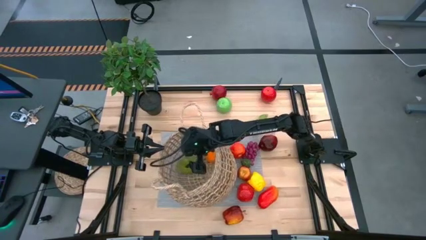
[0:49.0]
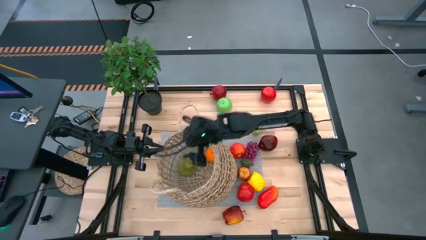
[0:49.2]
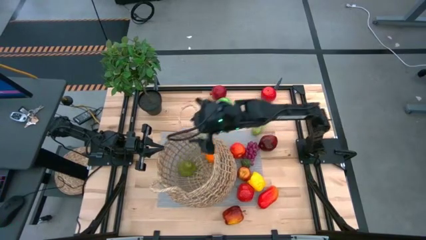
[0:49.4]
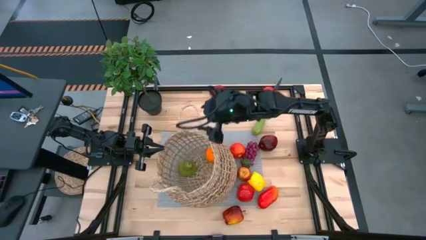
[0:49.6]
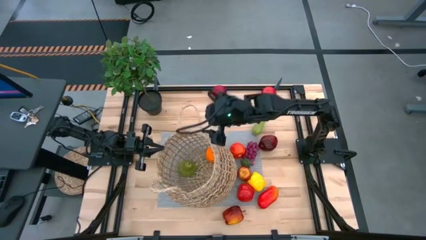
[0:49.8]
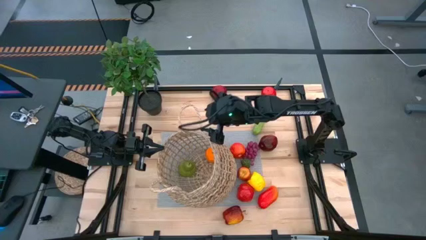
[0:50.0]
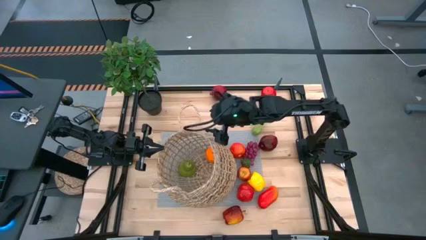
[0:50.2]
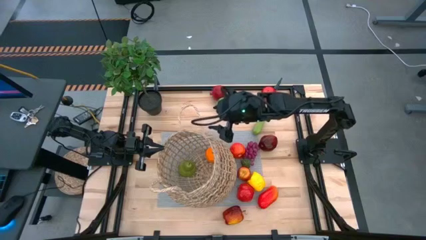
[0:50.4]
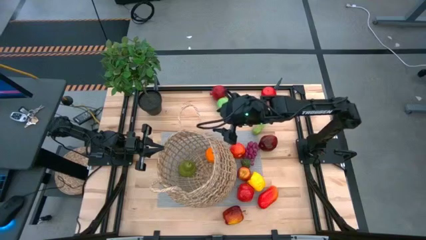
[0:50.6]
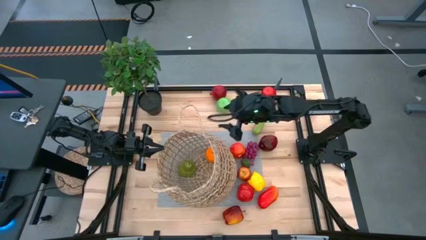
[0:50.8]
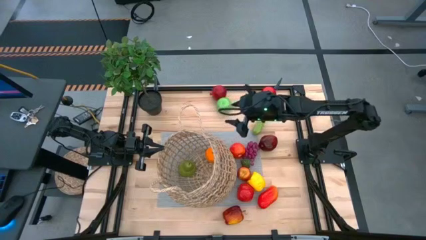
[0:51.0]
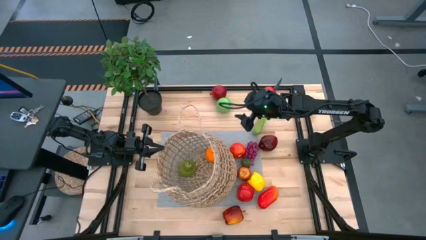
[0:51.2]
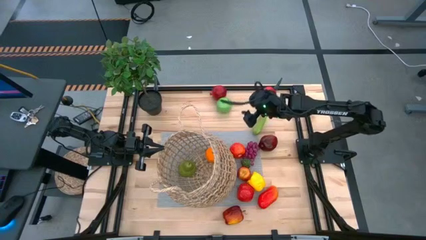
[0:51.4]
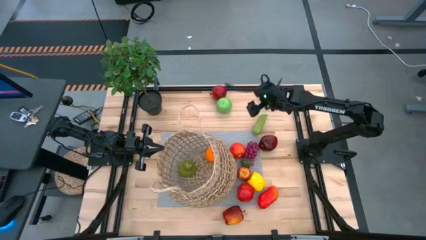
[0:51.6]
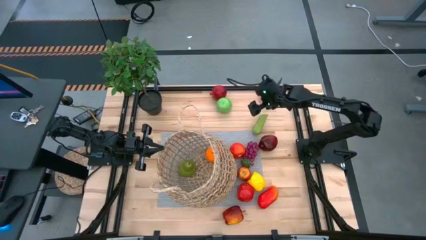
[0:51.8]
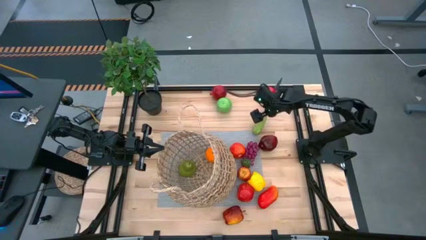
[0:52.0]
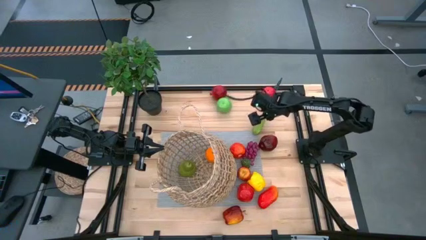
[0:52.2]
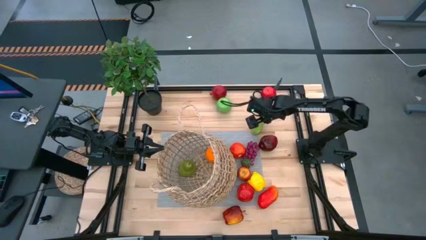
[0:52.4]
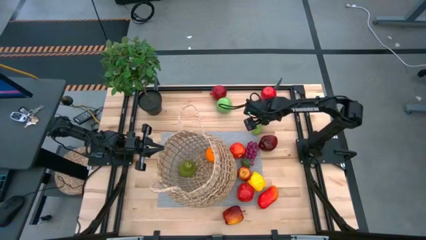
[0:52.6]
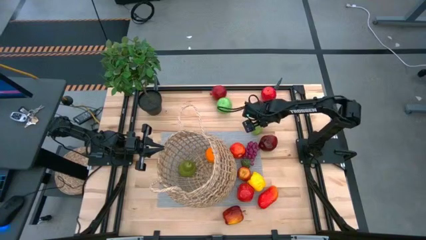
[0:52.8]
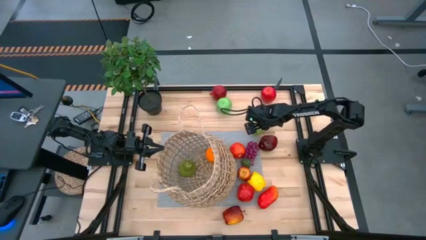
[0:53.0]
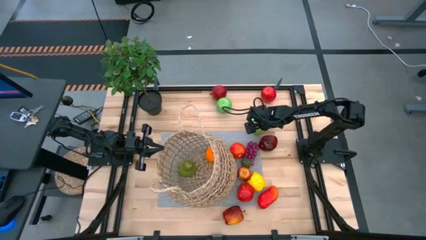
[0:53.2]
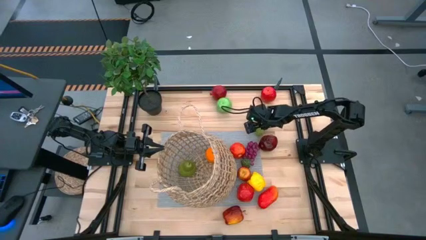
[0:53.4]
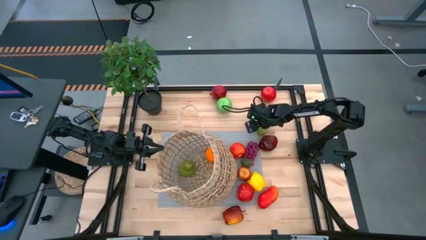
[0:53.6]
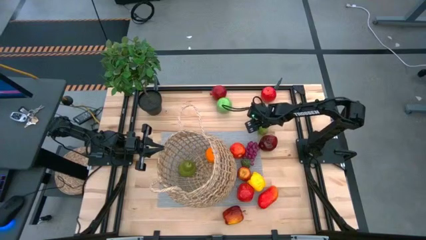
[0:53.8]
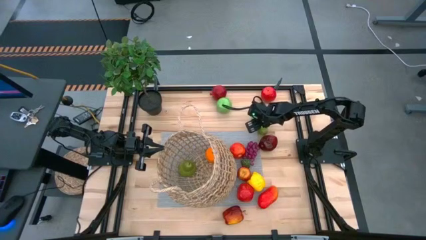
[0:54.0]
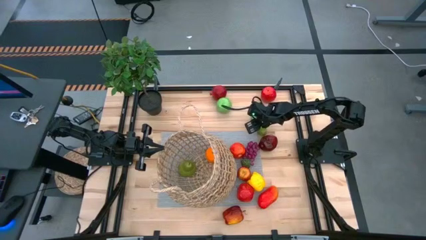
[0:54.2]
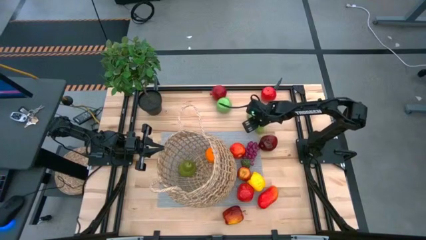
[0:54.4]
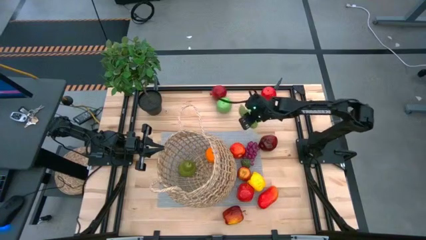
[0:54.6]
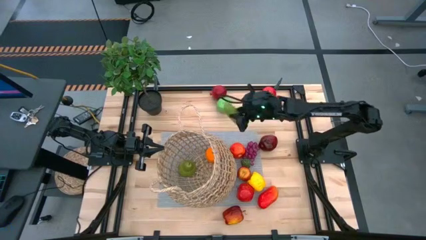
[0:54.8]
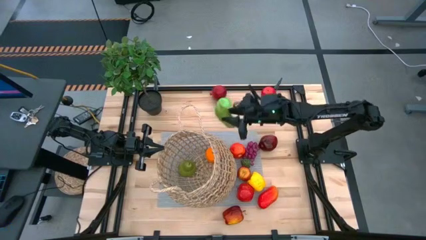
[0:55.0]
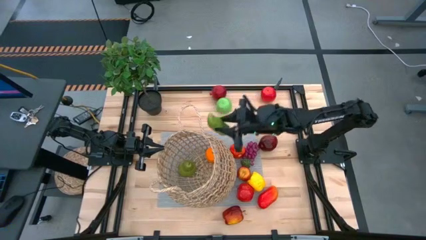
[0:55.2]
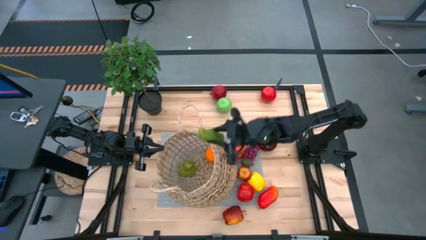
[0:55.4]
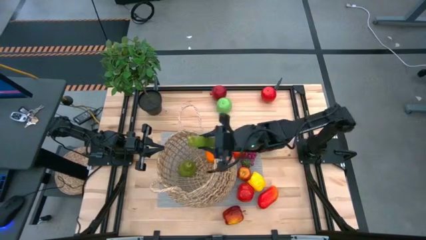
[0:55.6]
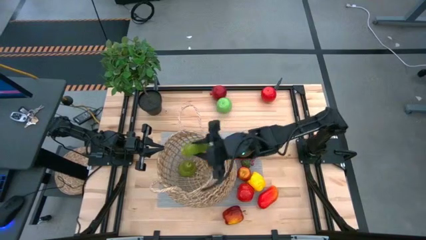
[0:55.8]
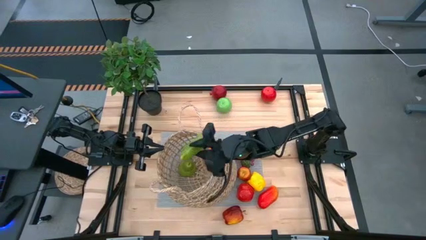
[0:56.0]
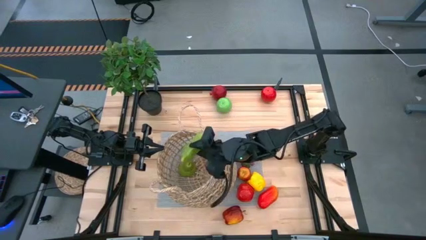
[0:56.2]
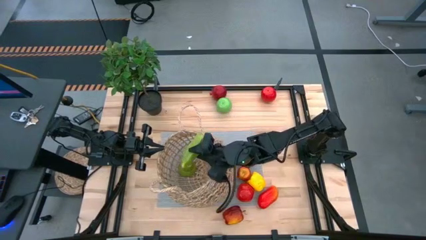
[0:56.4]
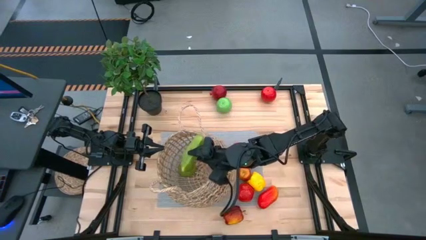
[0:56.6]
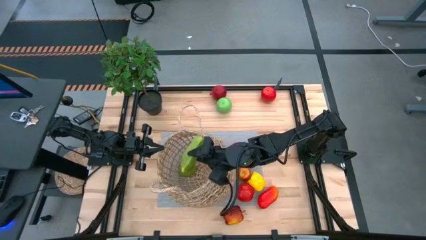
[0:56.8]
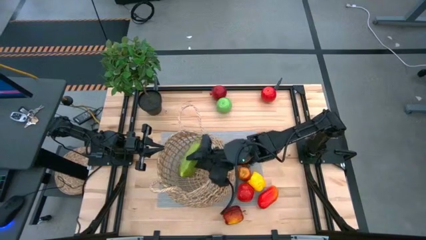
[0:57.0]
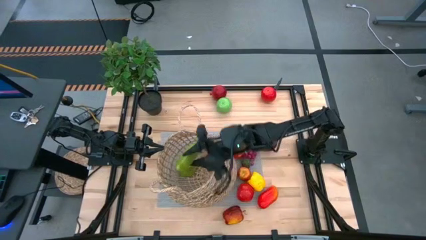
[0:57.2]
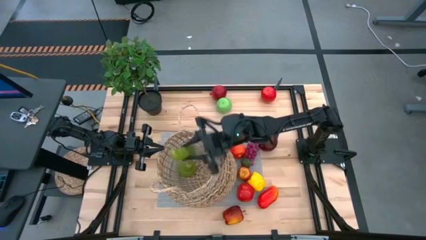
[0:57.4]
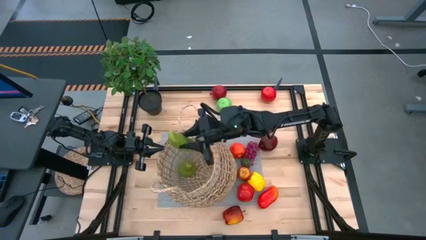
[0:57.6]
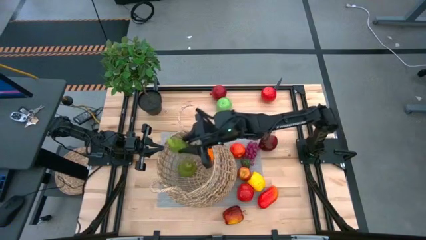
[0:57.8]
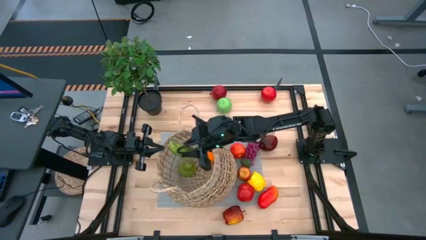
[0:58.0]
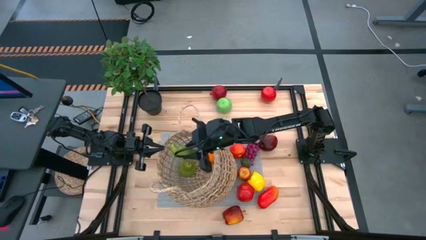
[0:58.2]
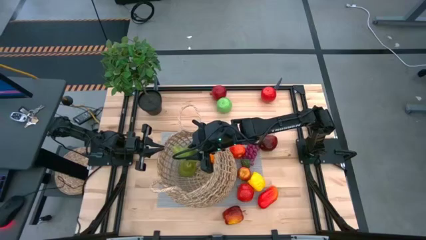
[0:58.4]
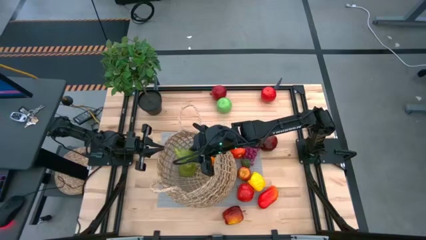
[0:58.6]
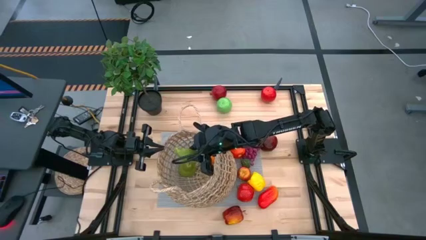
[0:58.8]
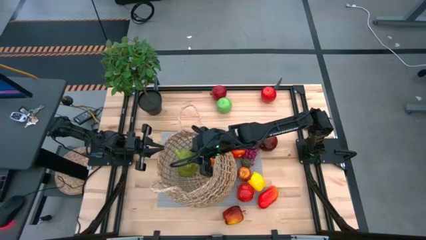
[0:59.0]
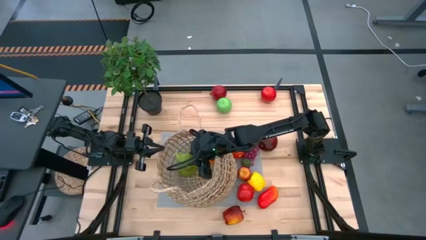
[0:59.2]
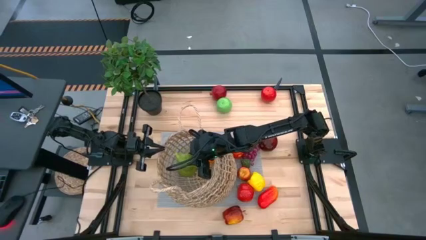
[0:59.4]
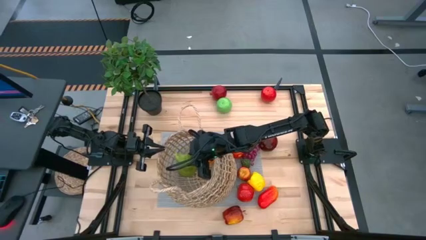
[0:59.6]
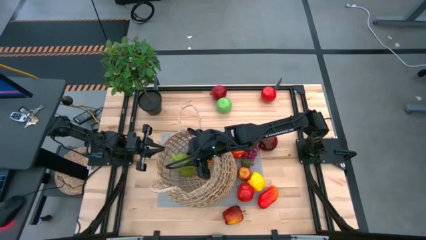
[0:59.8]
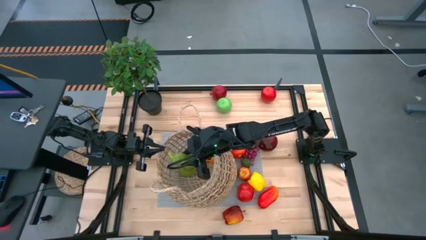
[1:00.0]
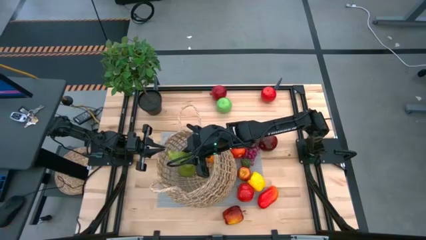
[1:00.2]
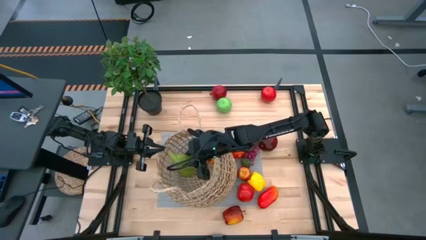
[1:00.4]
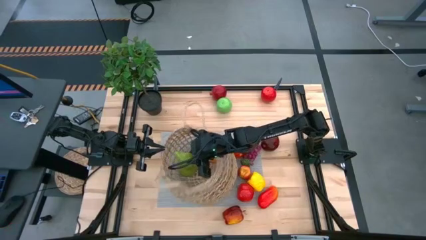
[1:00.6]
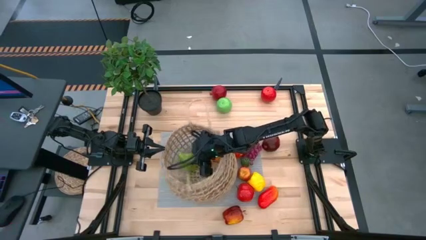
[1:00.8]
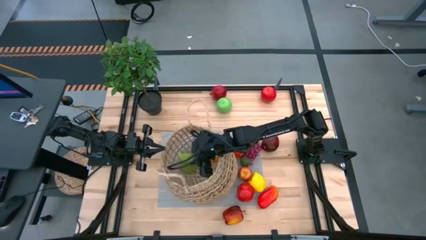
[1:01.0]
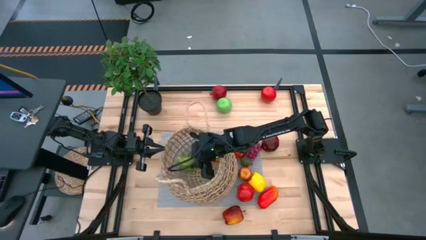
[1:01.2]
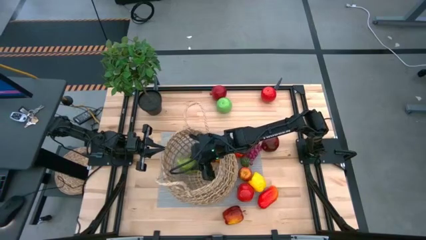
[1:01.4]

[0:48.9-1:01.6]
Task: Build produce basket
Put the cucumber into the brown basket

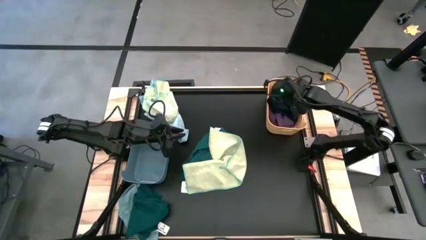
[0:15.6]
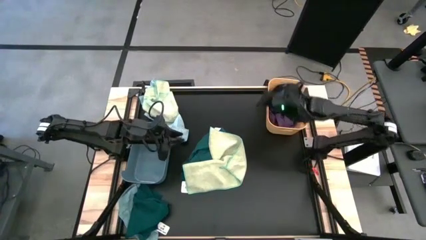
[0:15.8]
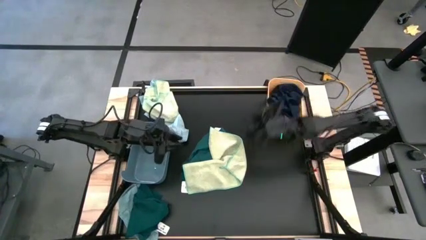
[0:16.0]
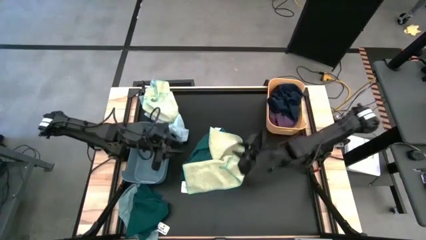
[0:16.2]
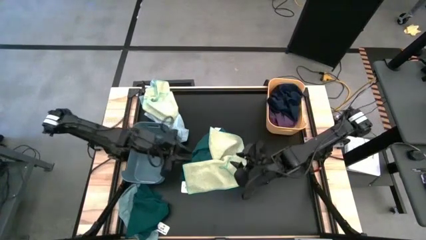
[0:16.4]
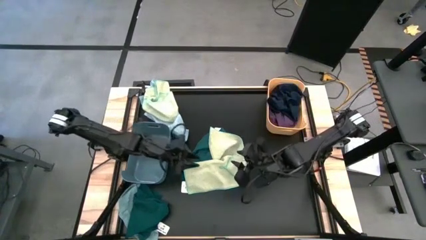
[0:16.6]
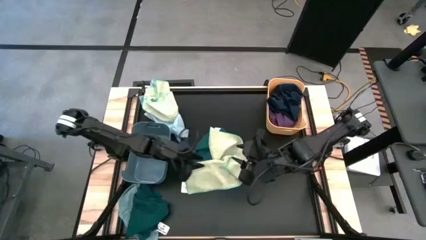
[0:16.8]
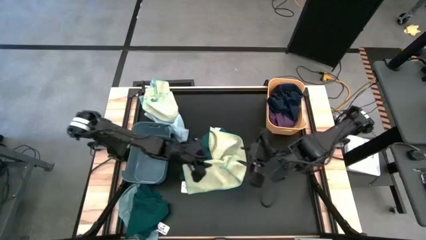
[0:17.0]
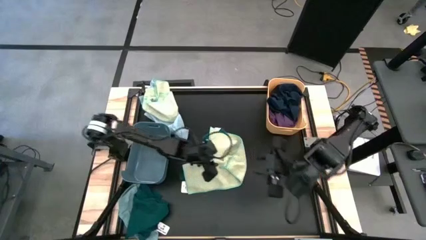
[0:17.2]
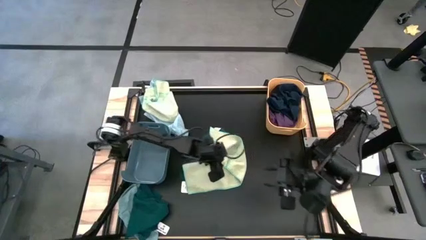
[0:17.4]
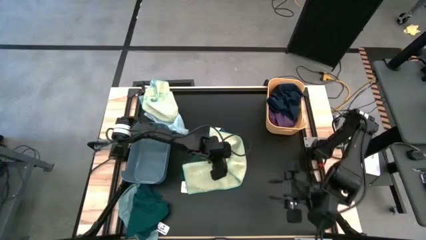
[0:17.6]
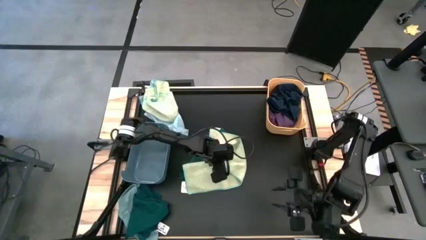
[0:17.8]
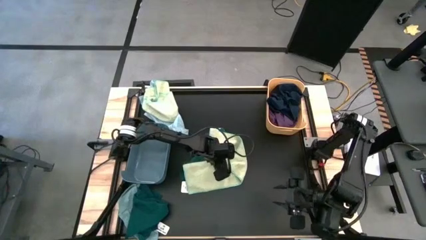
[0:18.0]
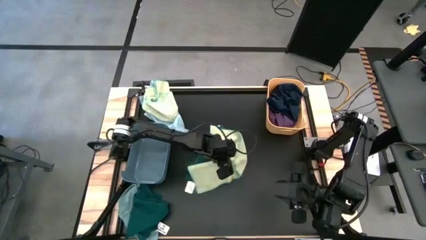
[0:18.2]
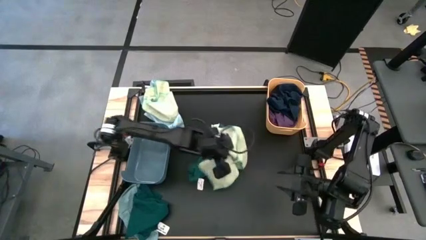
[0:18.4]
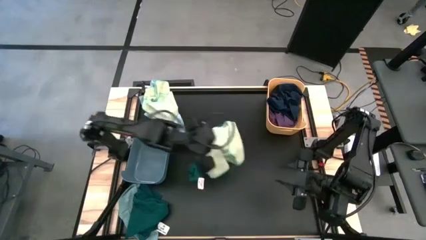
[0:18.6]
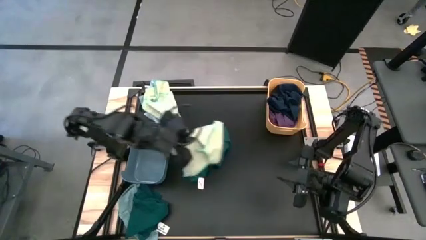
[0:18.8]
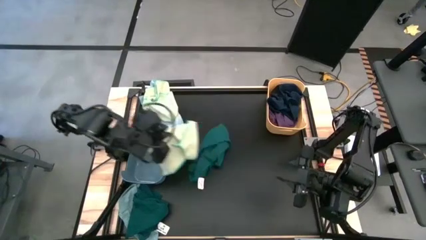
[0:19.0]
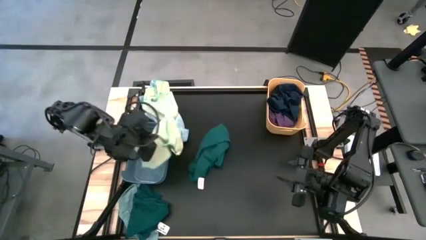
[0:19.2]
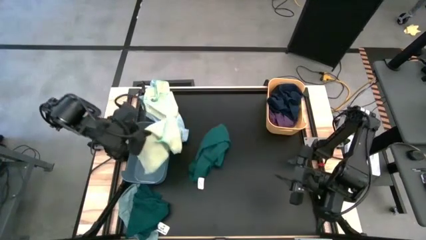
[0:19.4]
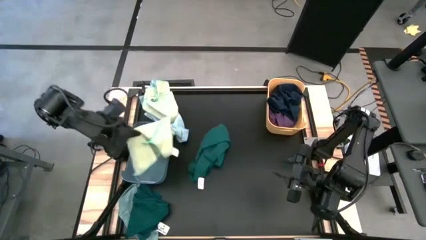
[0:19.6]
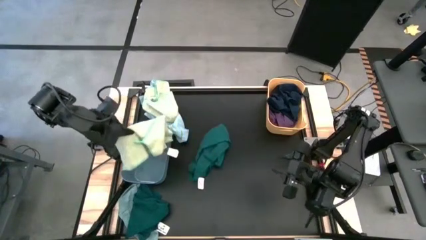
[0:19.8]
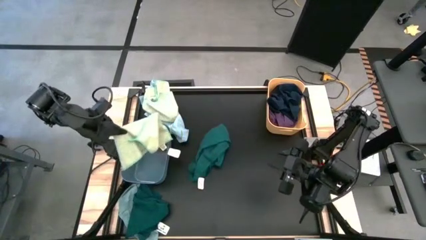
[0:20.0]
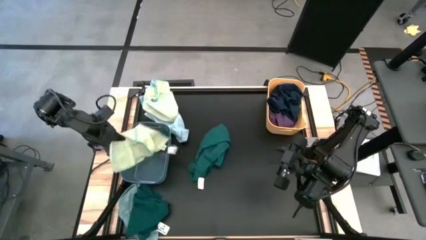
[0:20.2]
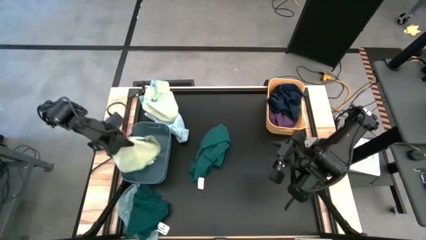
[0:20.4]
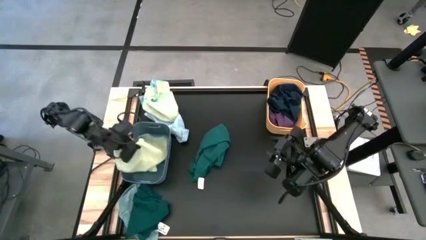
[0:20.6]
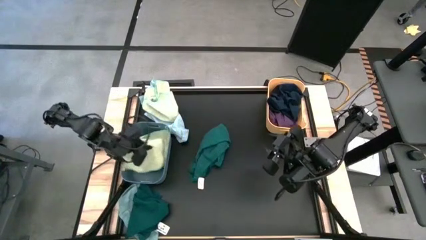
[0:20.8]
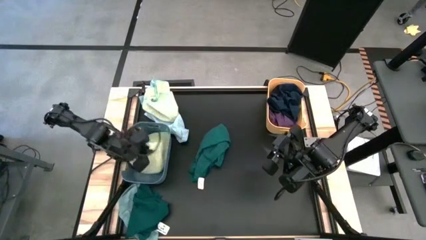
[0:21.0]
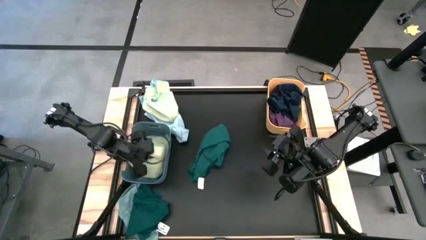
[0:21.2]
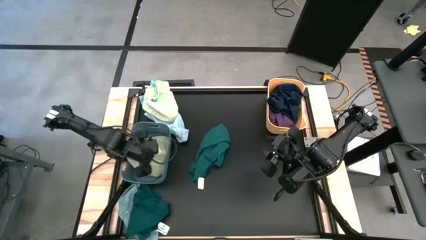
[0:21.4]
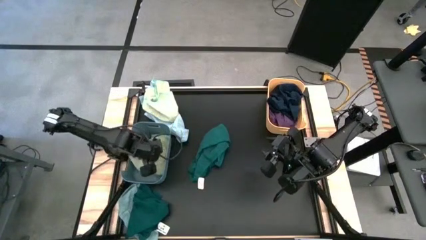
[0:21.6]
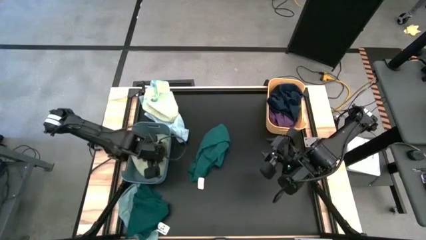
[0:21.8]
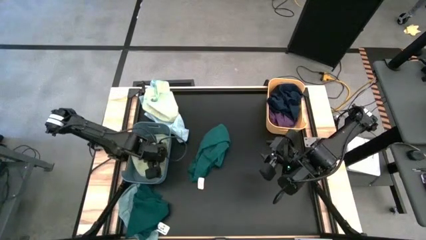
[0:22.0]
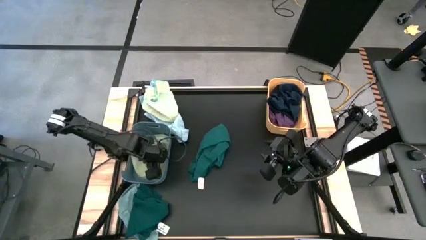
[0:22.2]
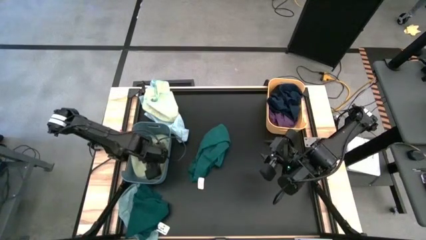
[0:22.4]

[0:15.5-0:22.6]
Task: Sort towels by color in basket
Put the right light yellow towel into the blue bin
